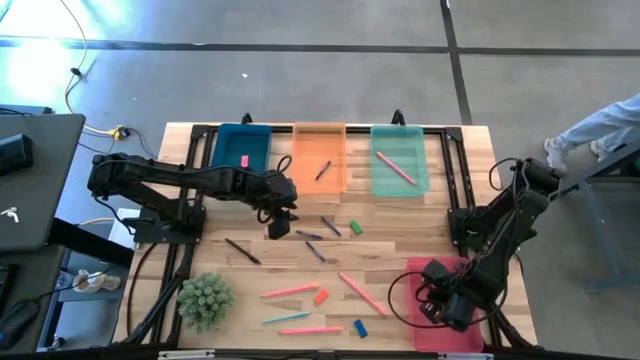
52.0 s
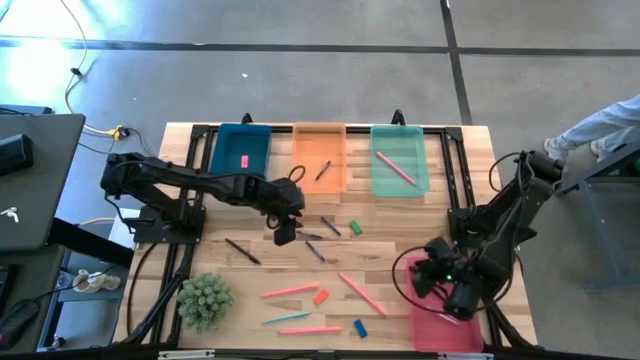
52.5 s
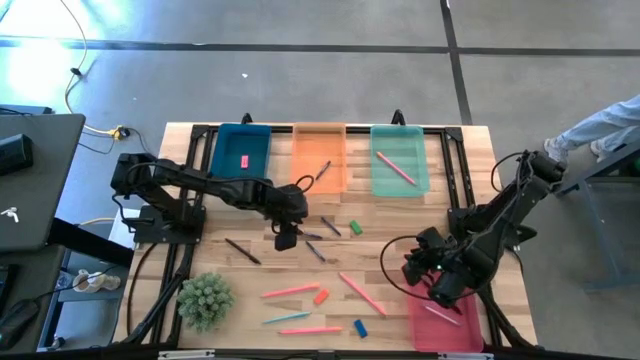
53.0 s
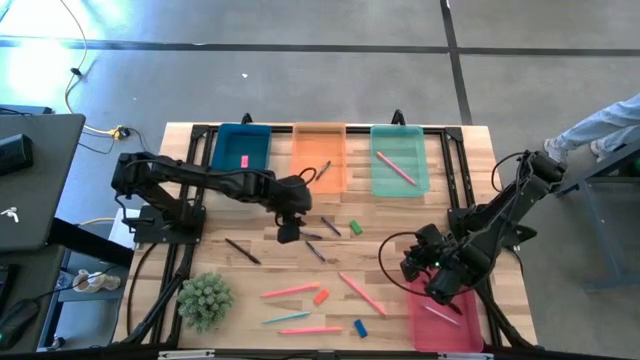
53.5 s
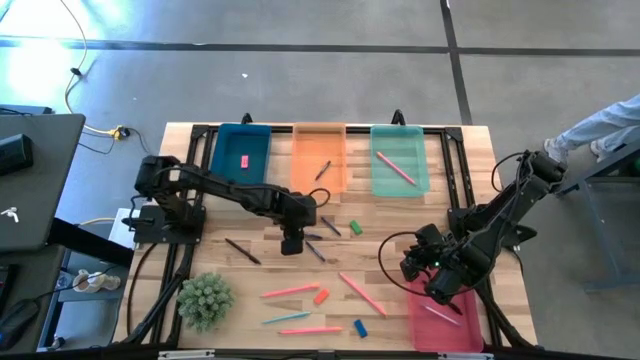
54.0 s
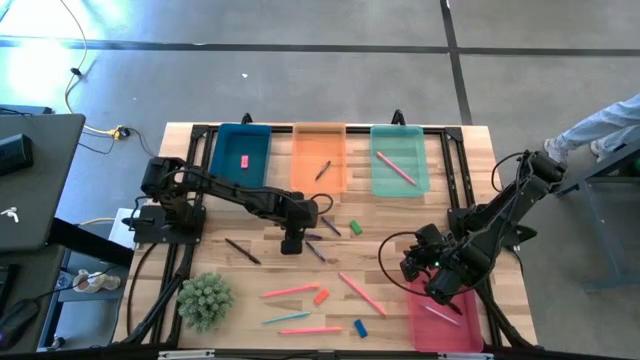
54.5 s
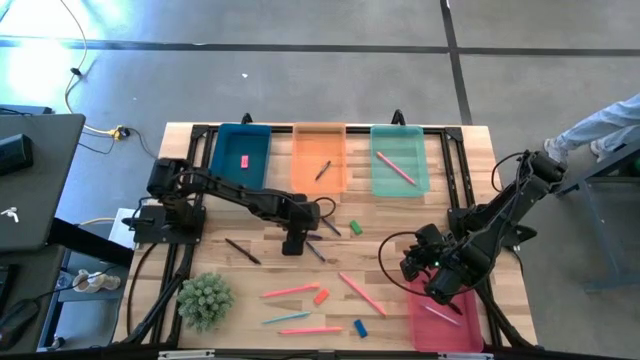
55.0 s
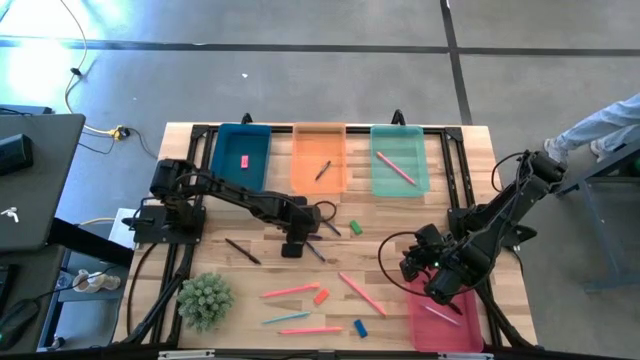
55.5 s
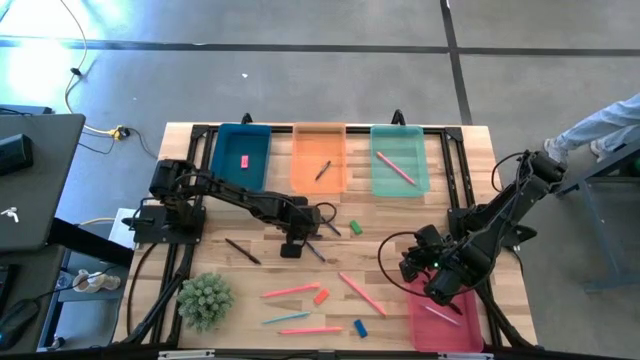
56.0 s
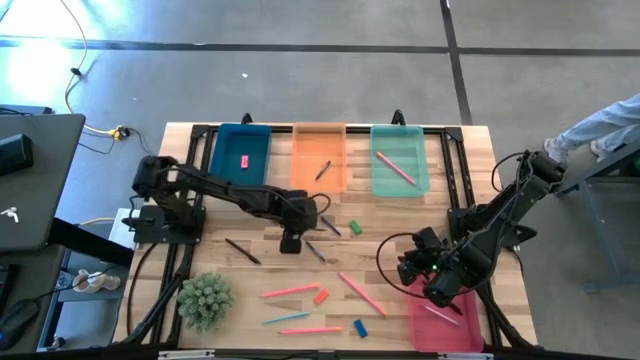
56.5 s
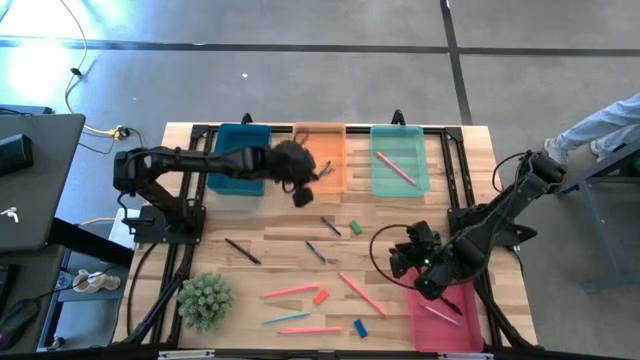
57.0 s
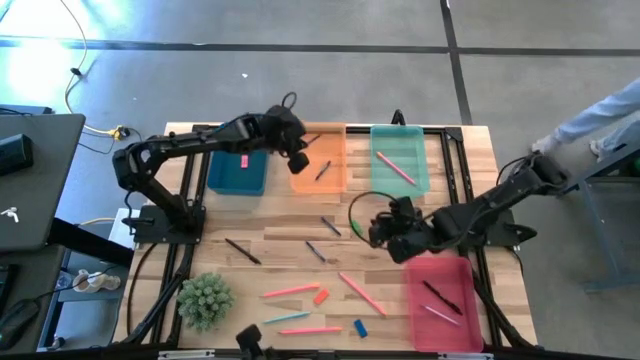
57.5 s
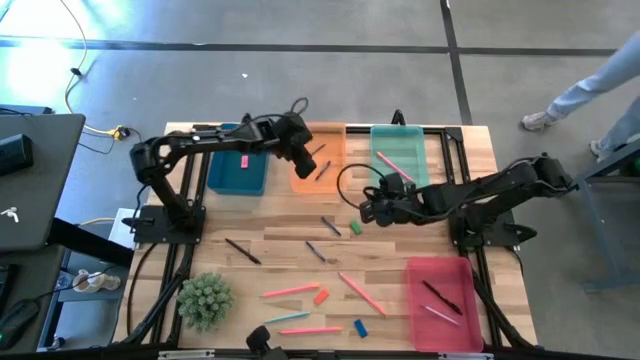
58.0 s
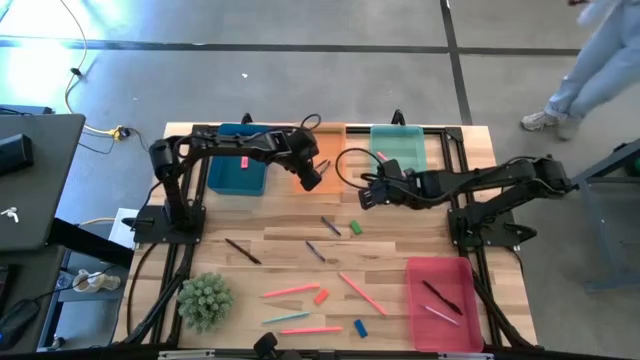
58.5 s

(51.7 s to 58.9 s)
Task: Sort crayons/erasers/pens/pencils in bins
Put the middle blue crayon into the orange bin

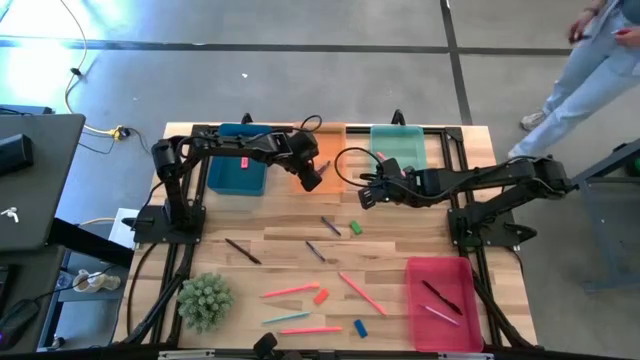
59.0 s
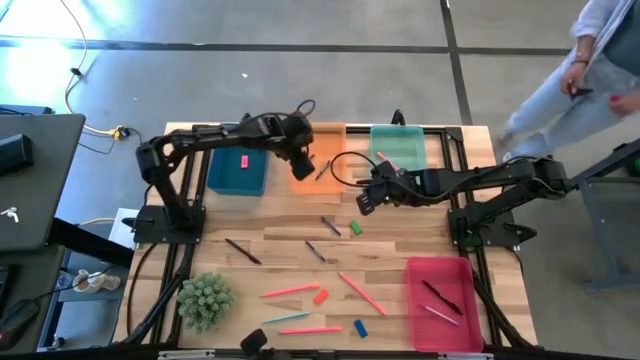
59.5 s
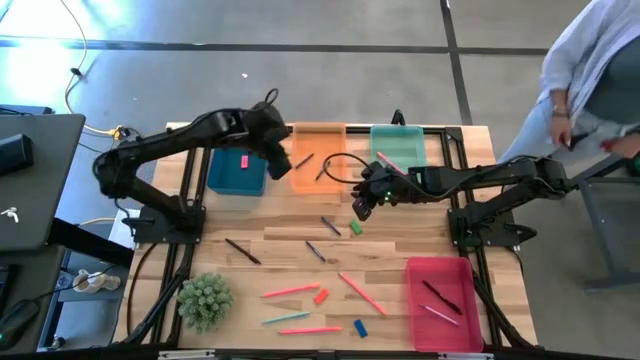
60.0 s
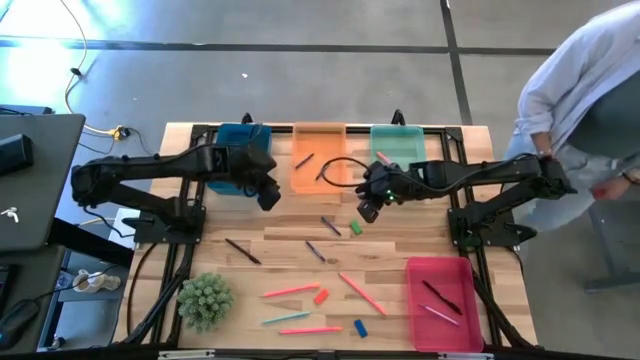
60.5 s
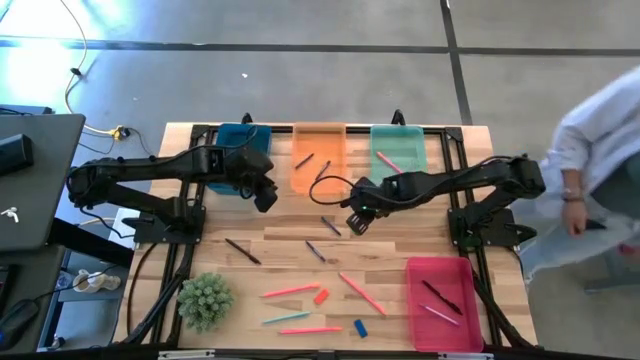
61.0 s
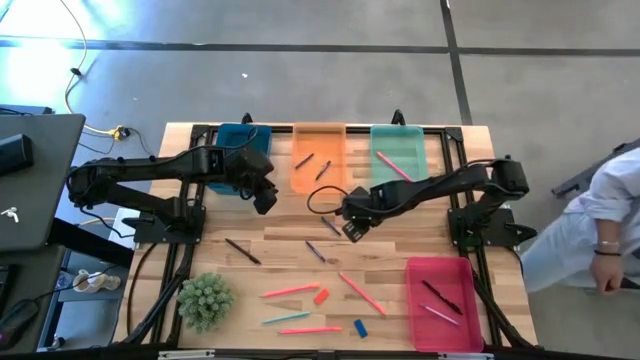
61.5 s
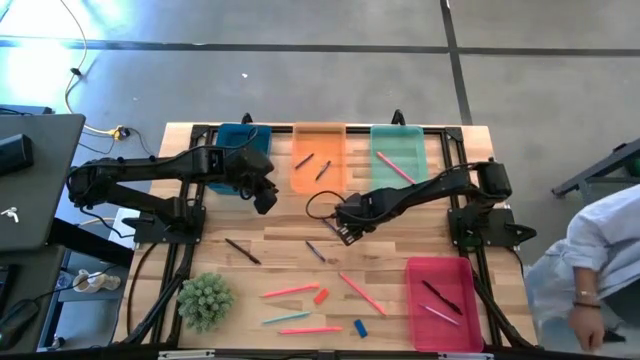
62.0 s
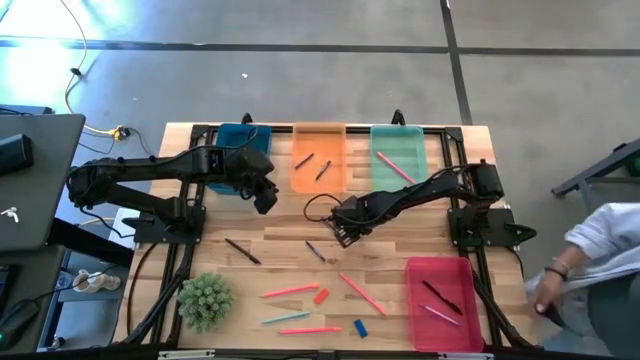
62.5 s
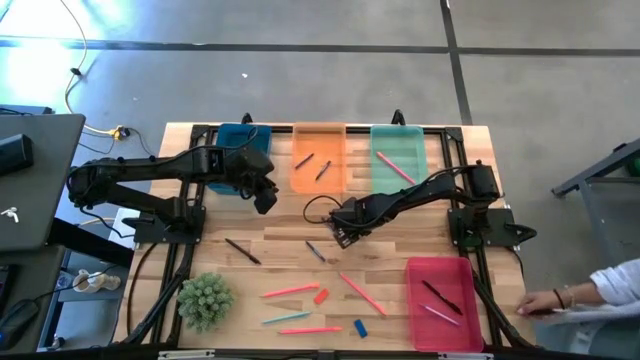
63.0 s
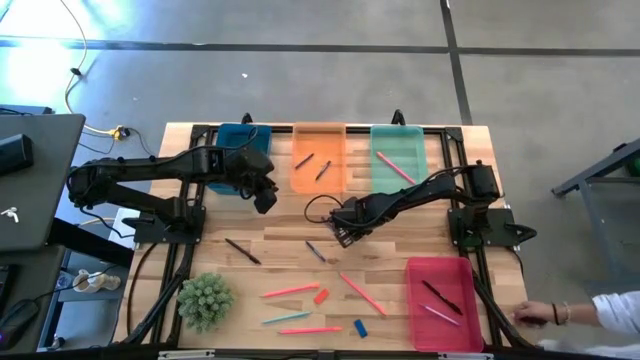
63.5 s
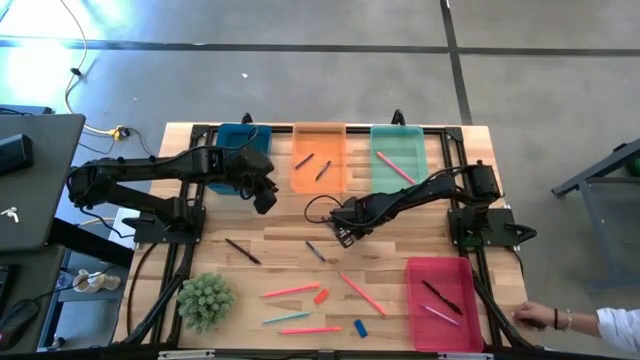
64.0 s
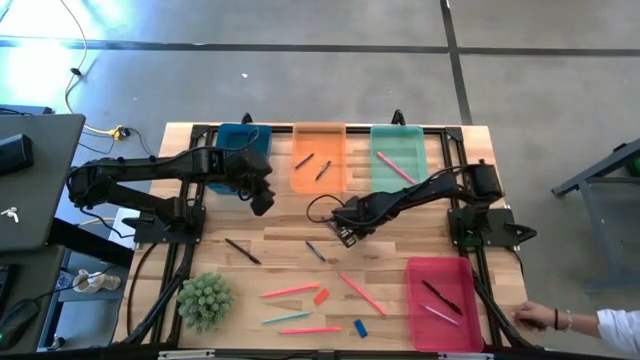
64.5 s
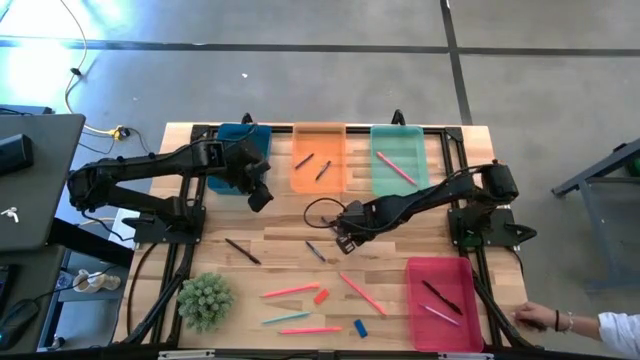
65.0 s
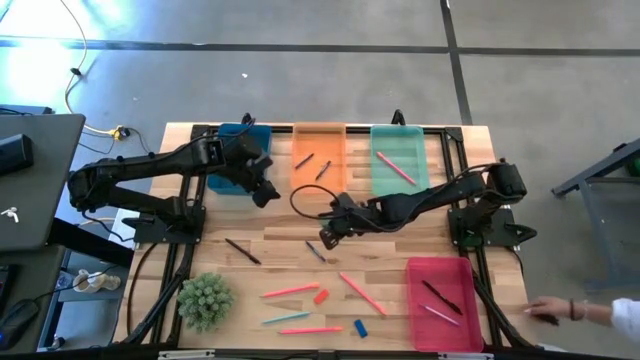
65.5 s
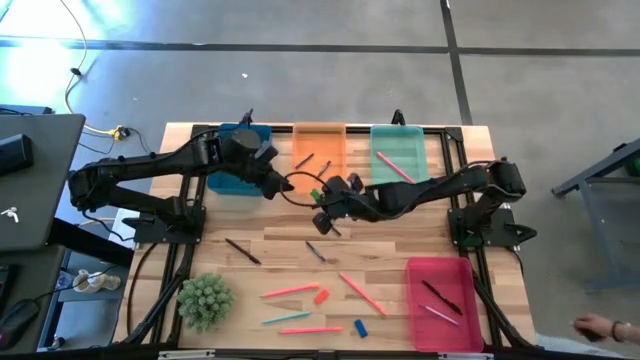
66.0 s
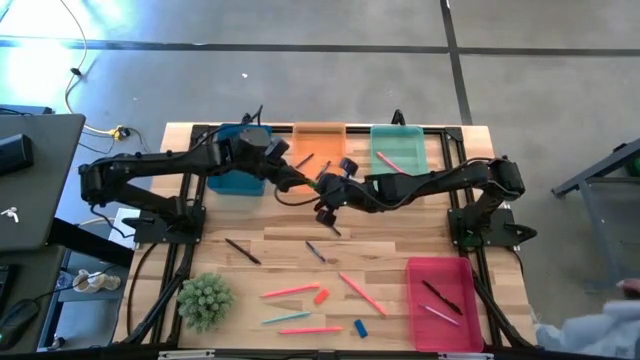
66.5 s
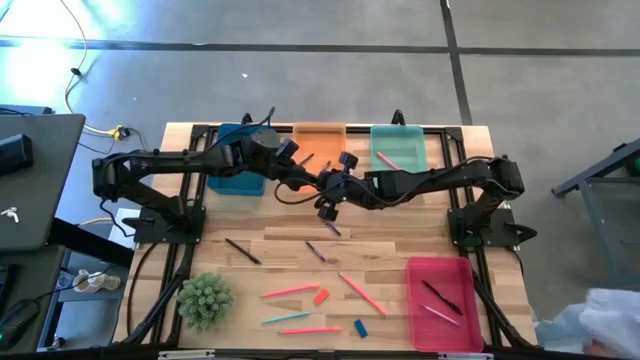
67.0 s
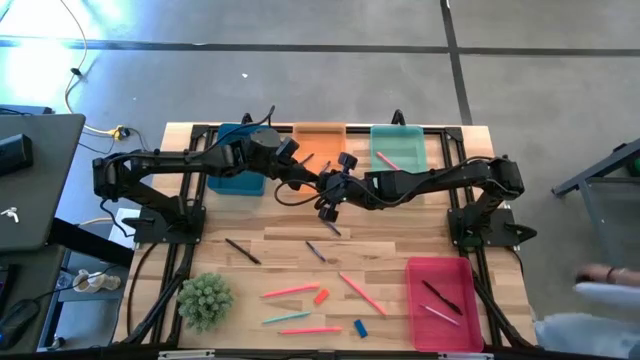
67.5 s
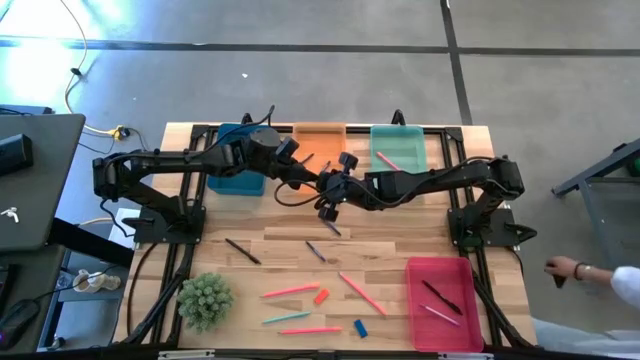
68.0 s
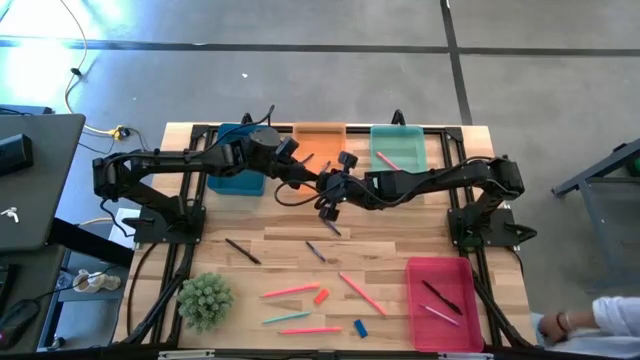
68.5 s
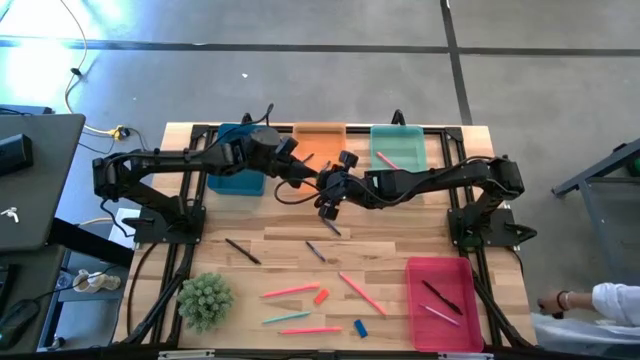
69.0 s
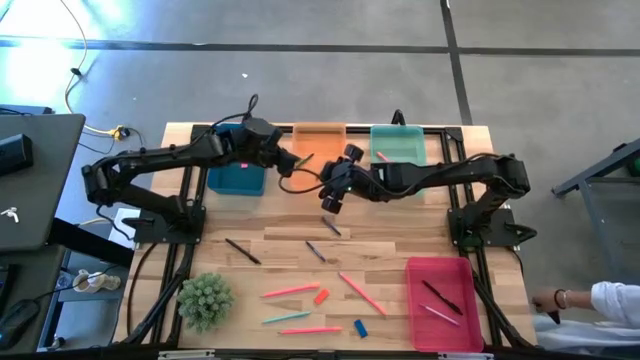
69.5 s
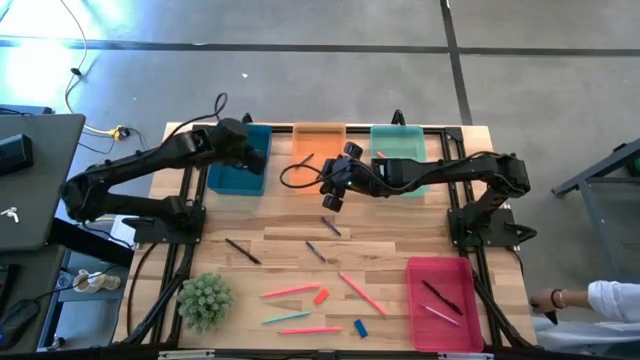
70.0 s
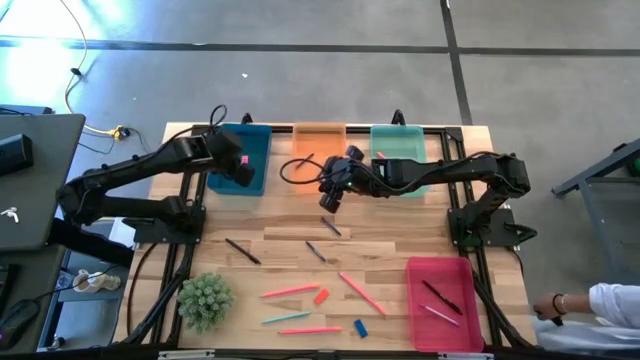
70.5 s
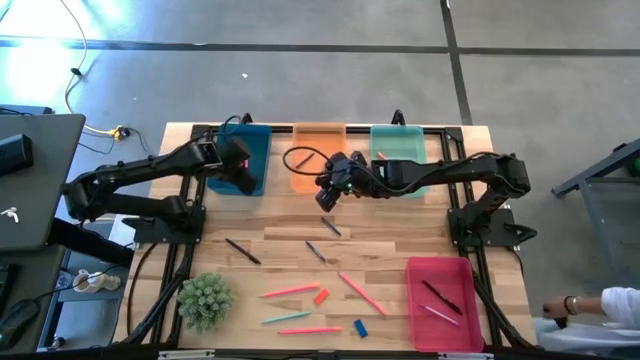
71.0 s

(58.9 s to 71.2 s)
Put the green eraser into the dark blue bin

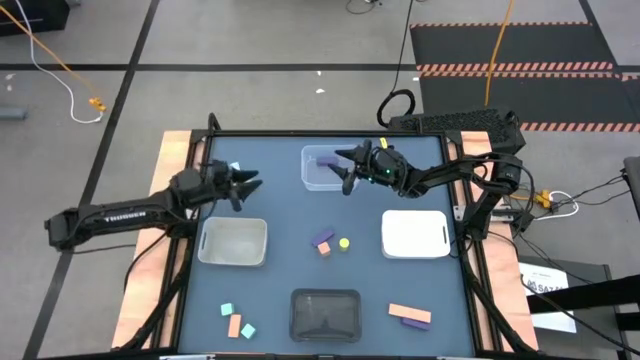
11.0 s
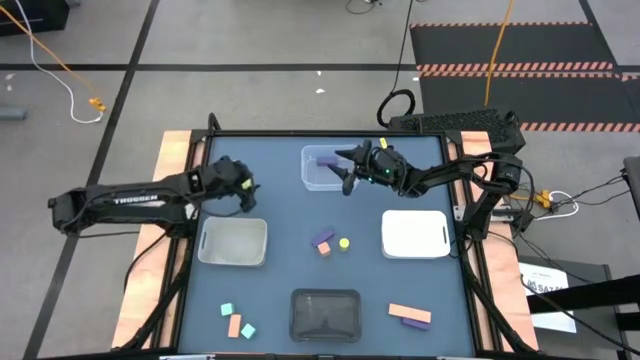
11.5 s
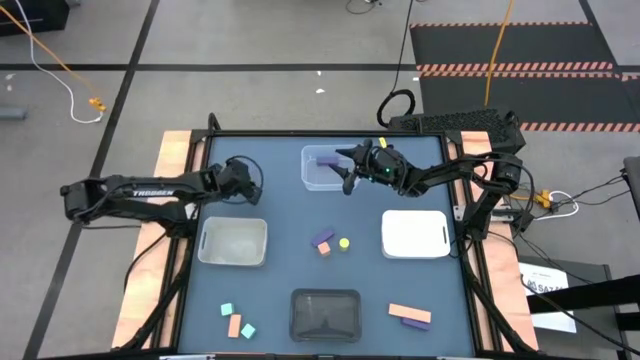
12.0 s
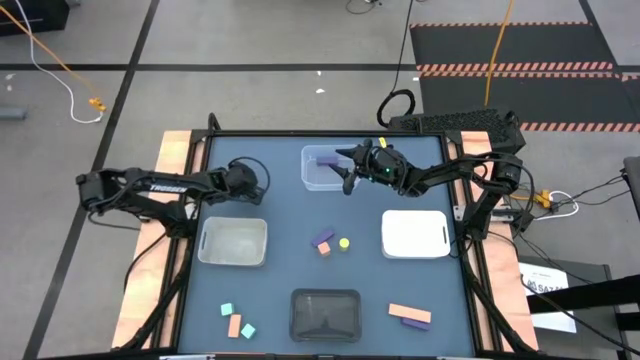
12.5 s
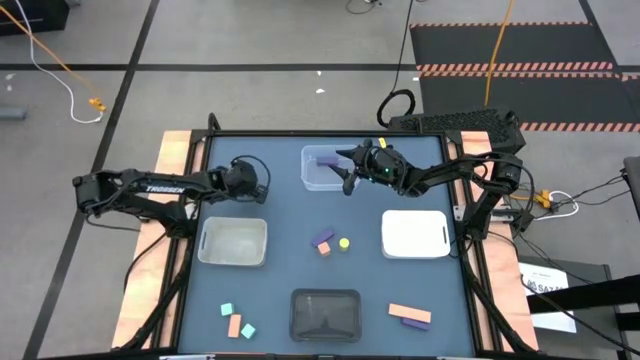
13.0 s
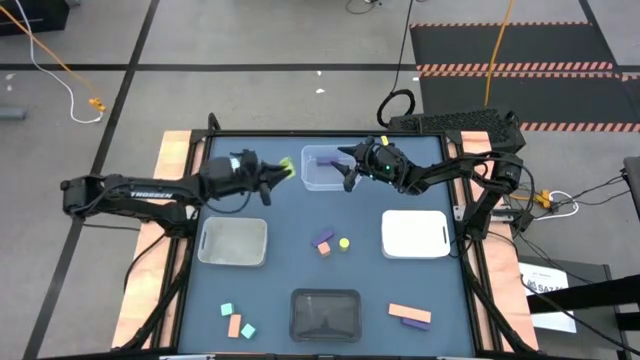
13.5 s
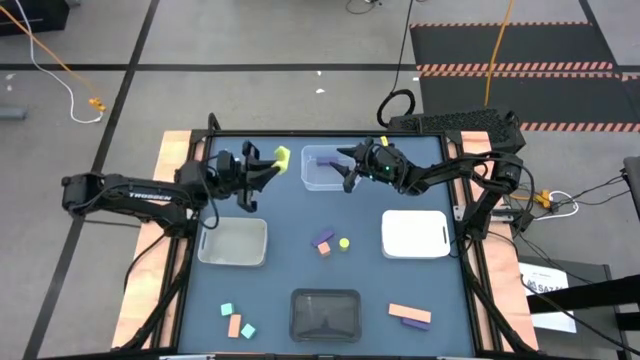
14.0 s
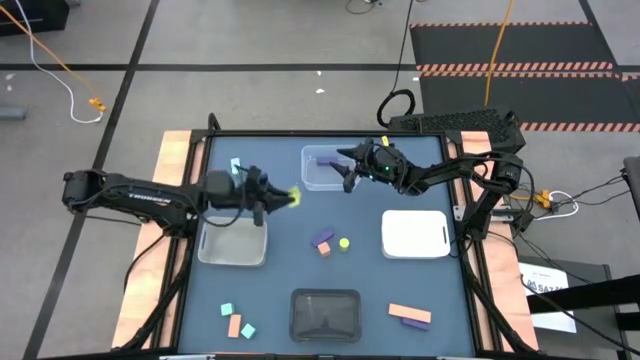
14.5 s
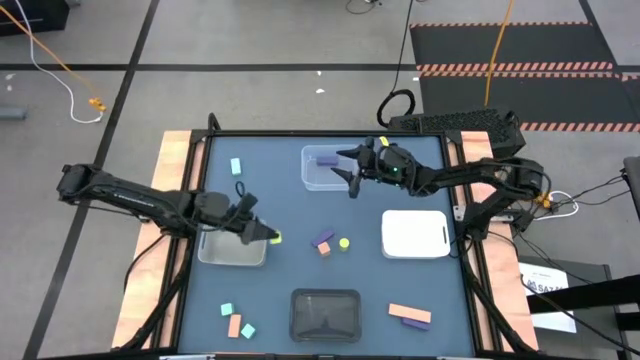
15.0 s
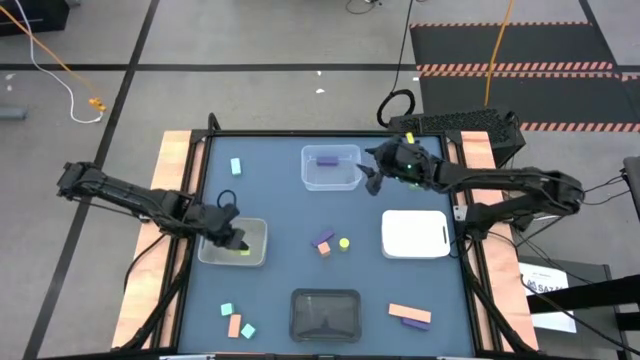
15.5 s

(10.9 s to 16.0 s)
Task: Sort & place blocks by color
Put the top left light yellow block into the gray bin
